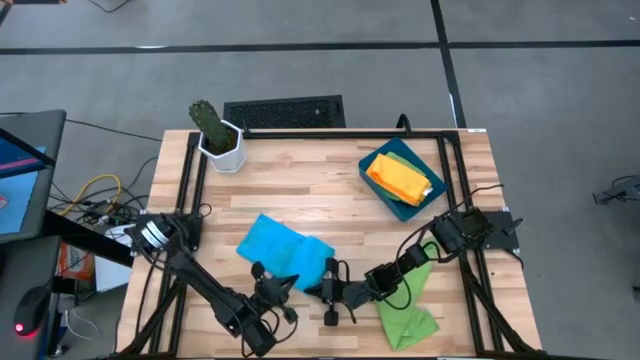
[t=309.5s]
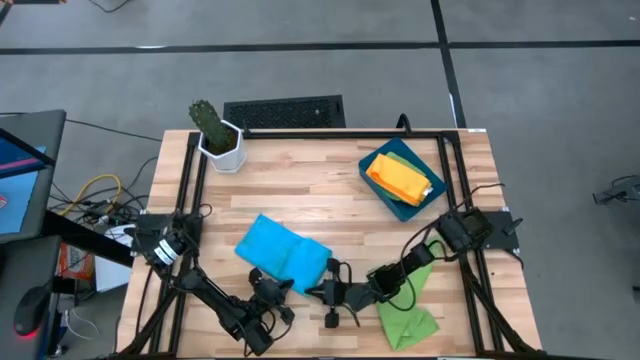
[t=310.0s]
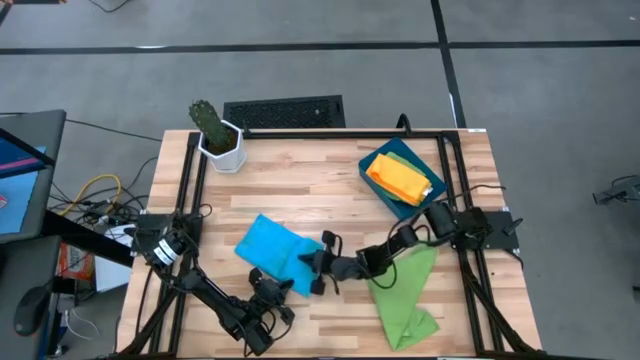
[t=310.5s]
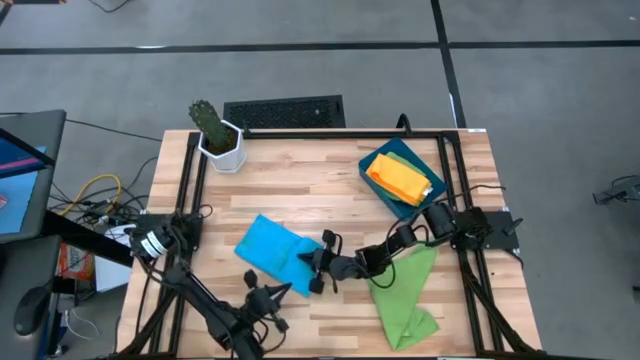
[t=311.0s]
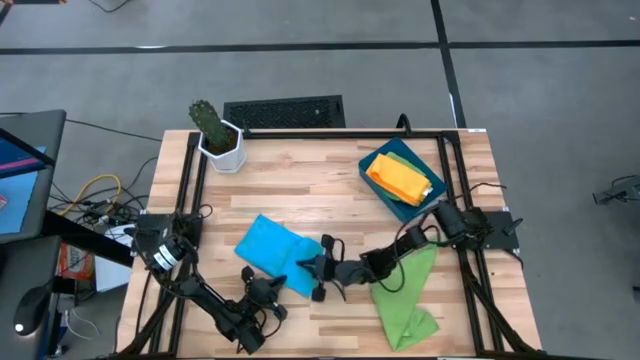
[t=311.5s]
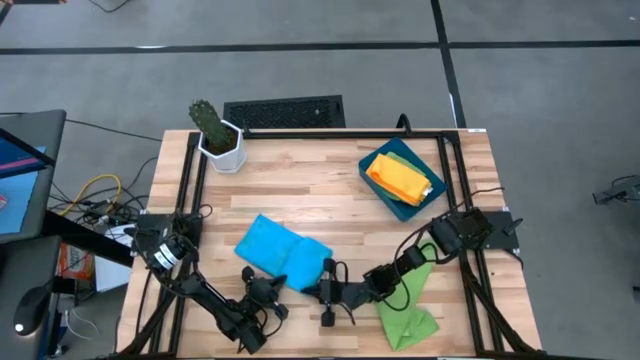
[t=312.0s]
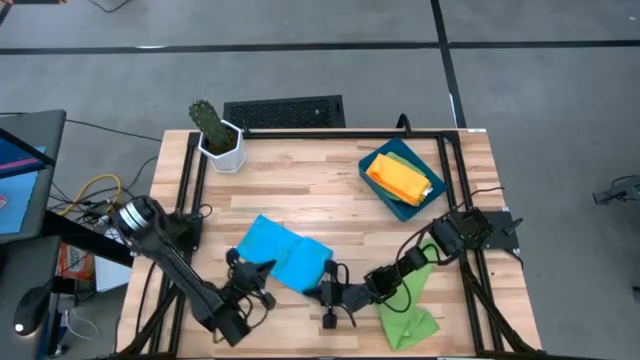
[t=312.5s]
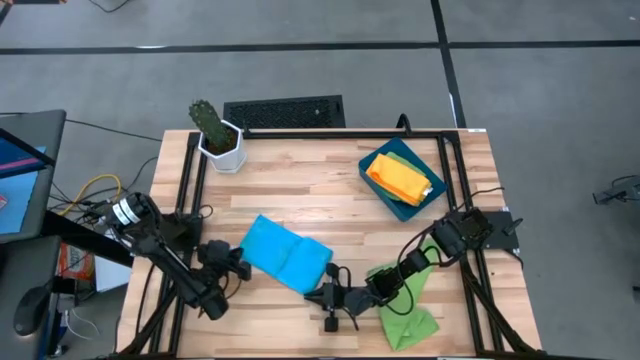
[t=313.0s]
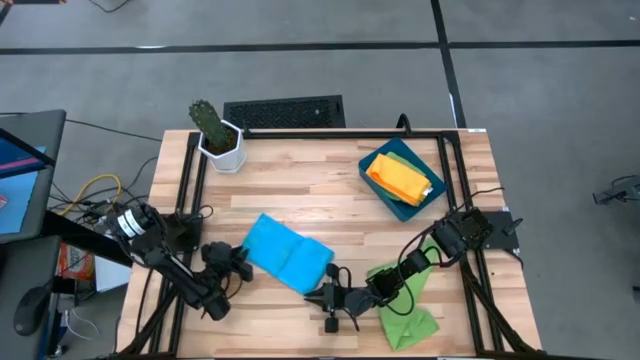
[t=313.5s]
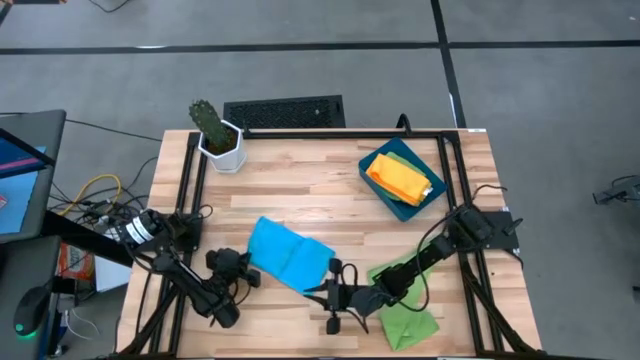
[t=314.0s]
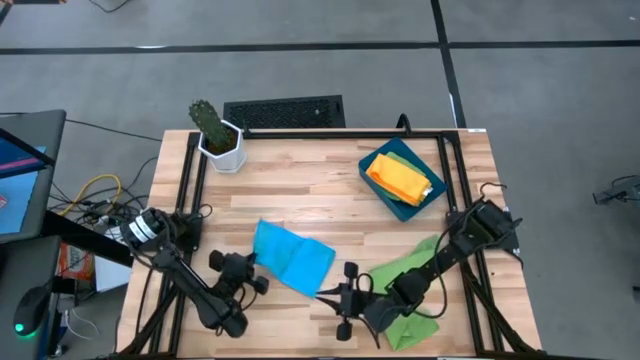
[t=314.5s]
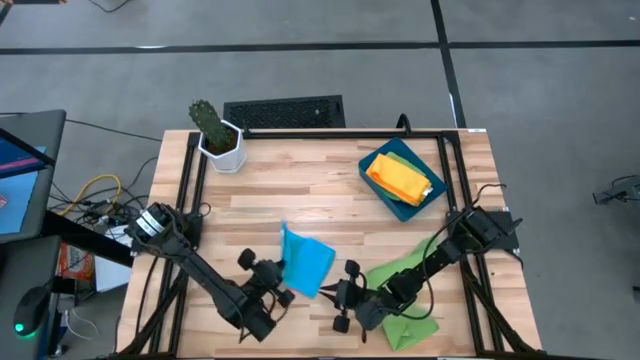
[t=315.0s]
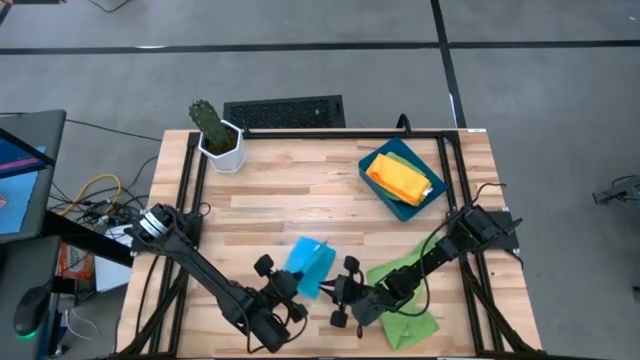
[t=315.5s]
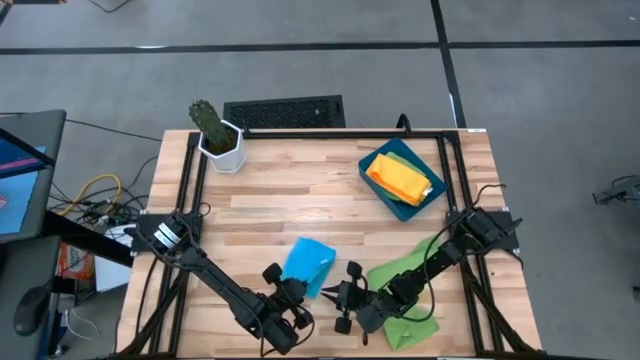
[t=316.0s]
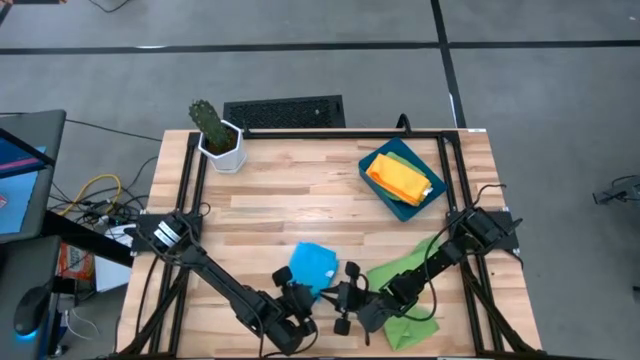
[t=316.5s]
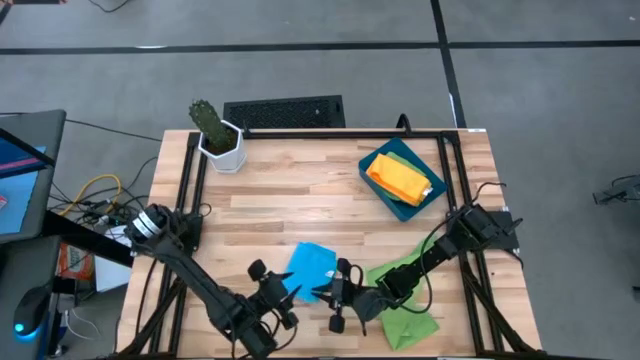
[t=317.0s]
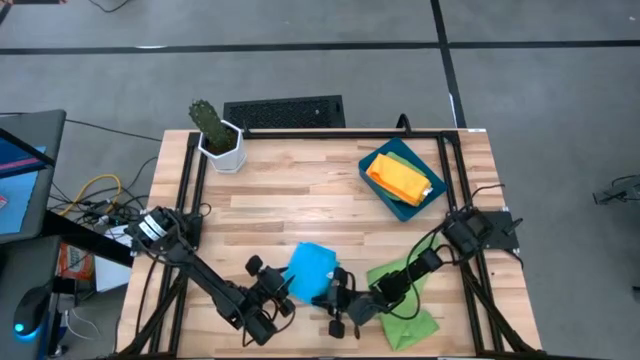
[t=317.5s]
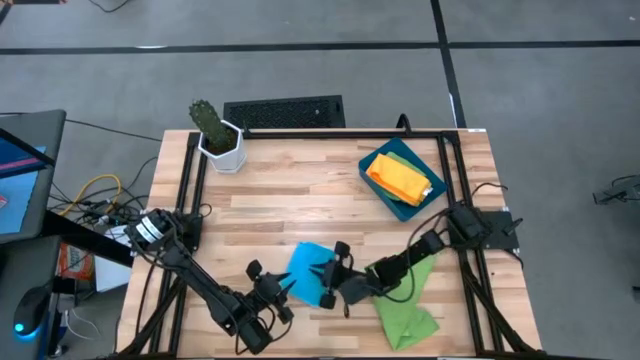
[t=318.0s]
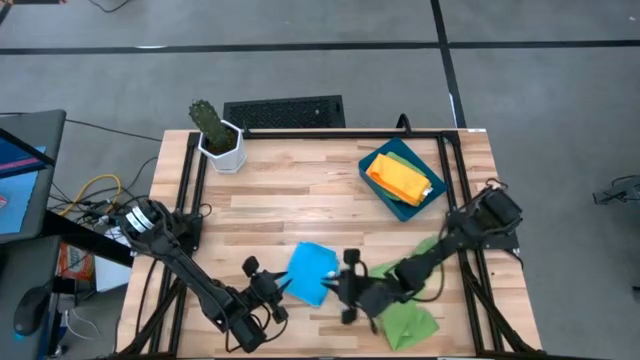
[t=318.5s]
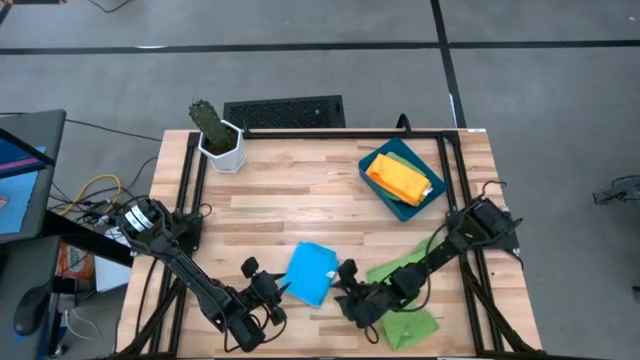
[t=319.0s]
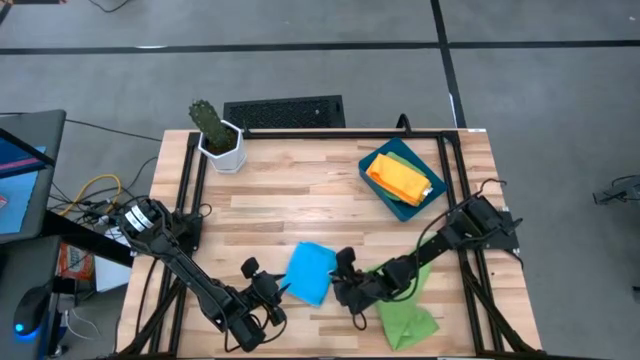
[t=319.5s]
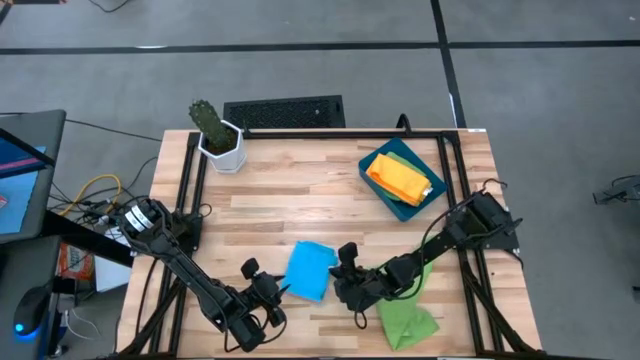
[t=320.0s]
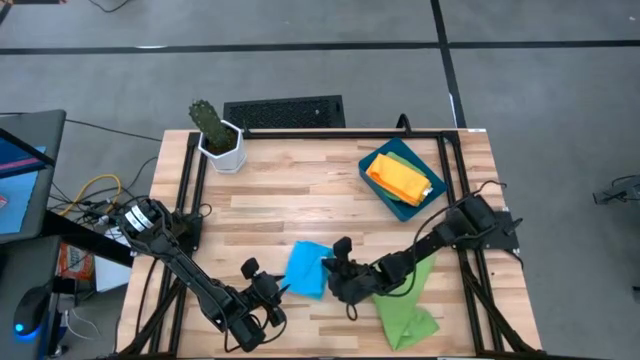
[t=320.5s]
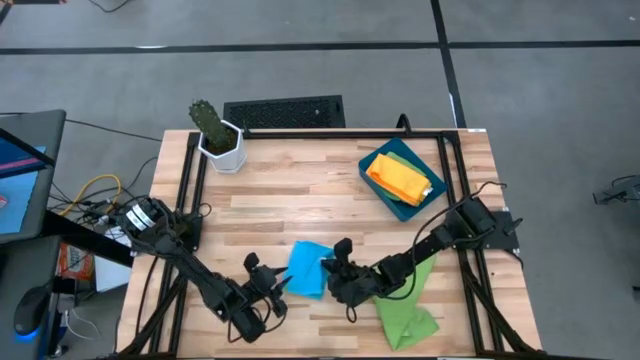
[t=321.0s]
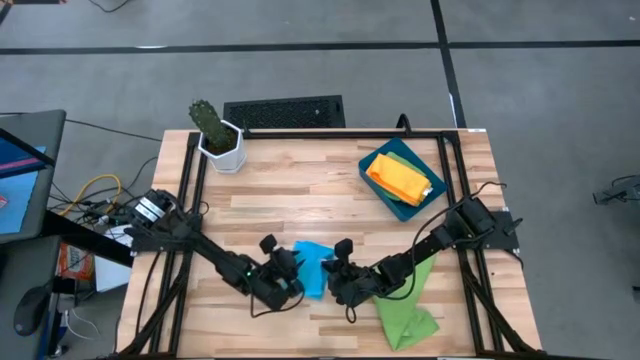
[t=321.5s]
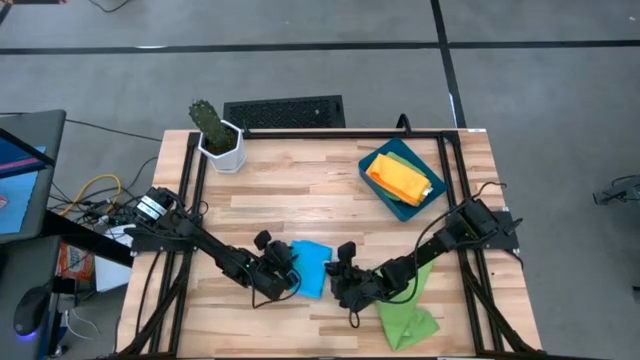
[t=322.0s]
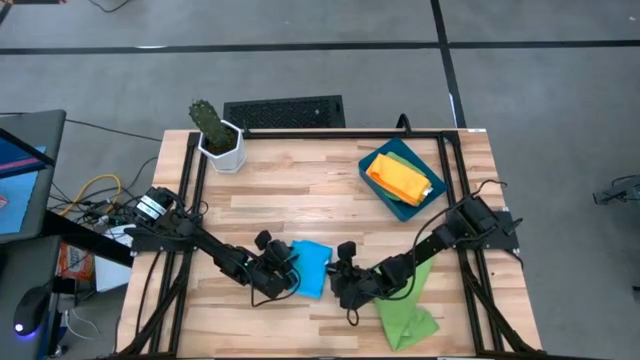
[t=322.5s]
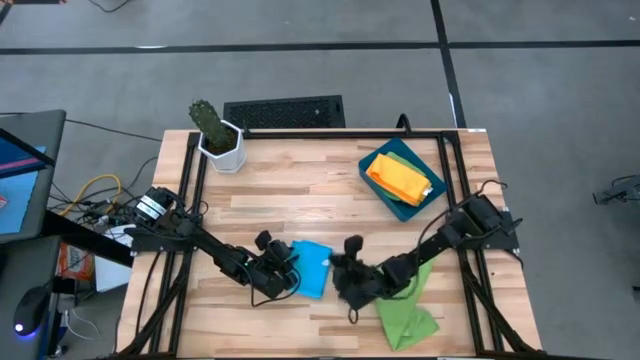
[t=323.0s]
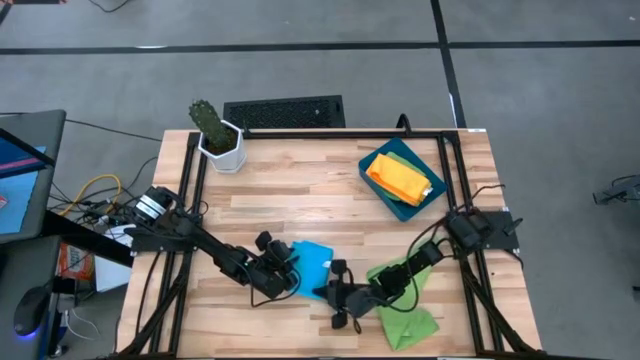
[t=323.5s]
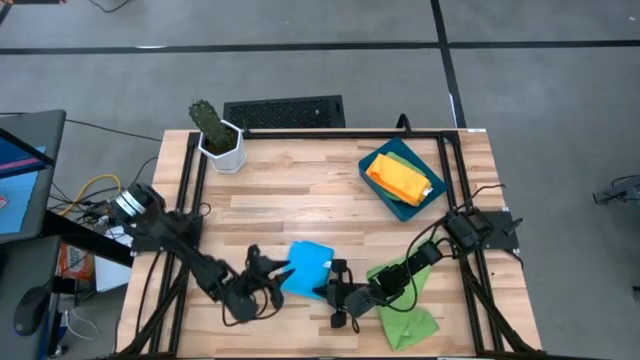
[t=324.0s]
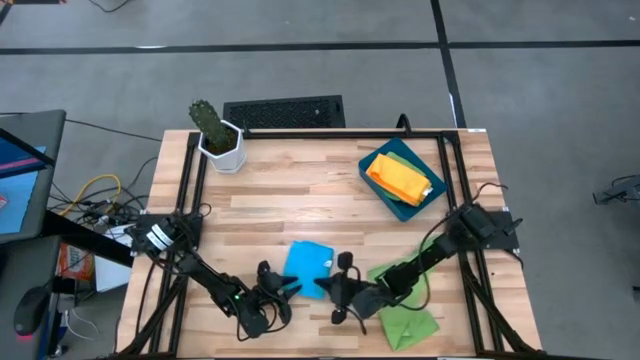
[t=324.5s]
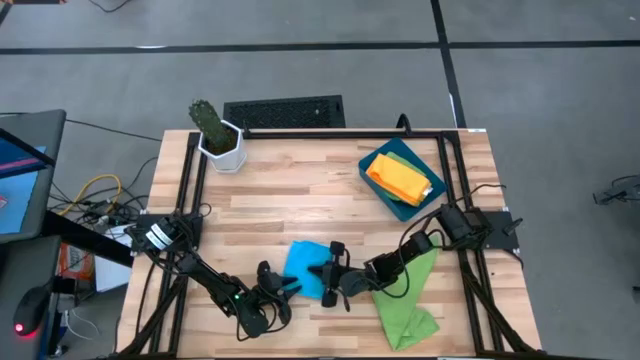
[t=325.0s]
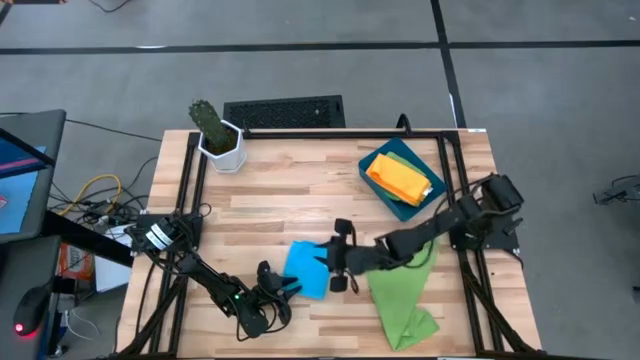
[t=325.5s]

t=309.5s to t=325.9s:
Task: Fold microfiber towels
Fold the blue microfiber cloth

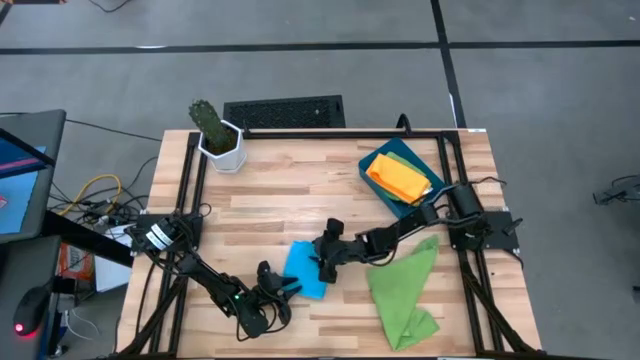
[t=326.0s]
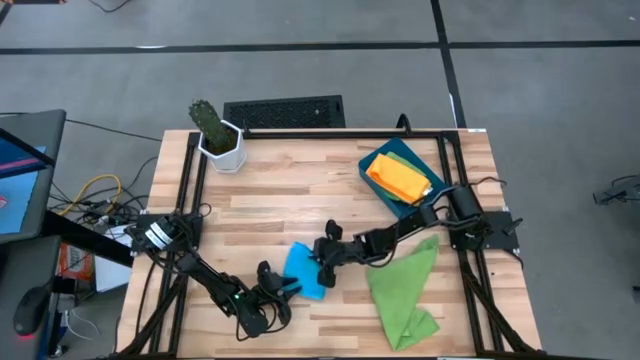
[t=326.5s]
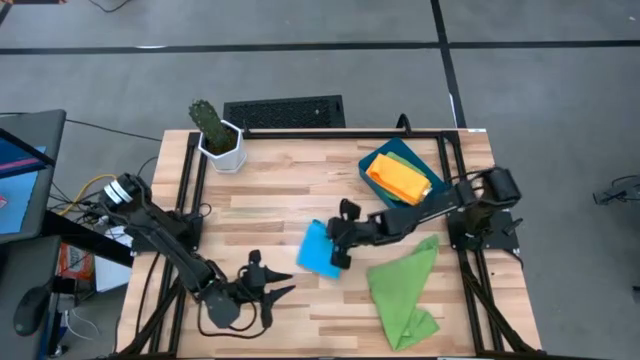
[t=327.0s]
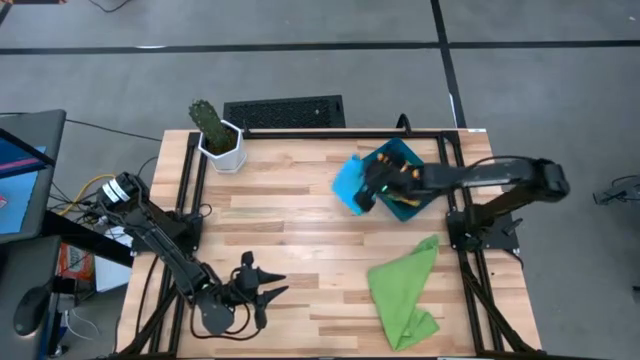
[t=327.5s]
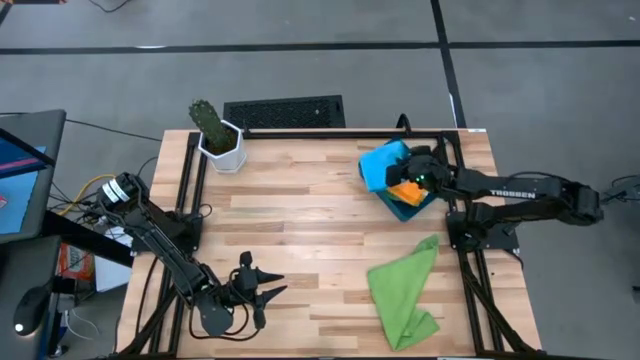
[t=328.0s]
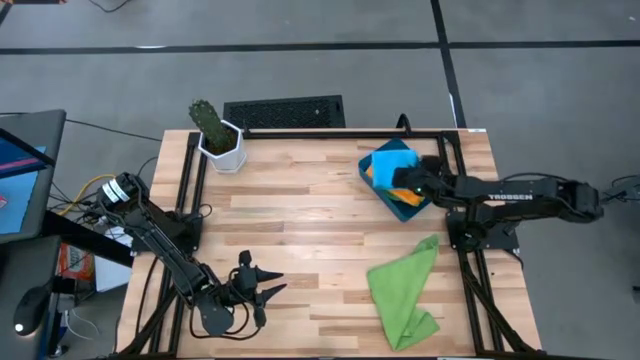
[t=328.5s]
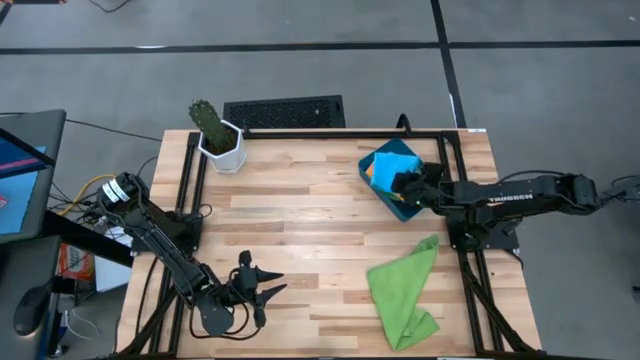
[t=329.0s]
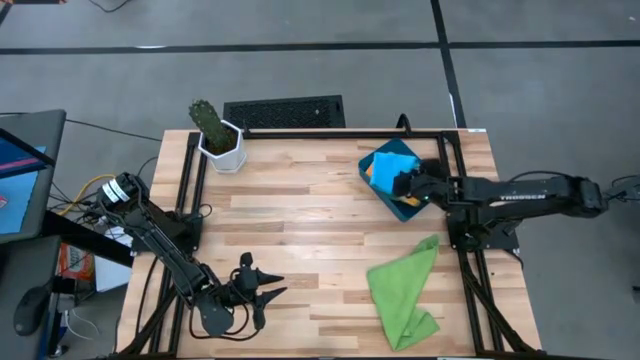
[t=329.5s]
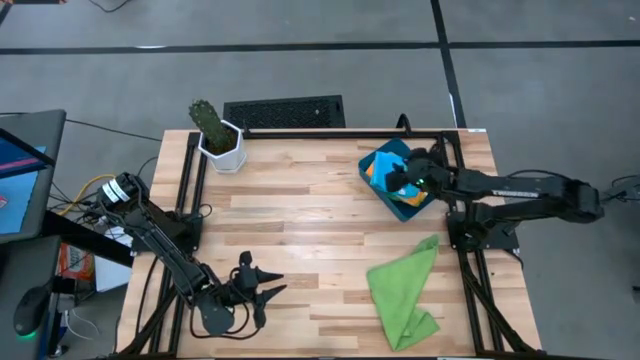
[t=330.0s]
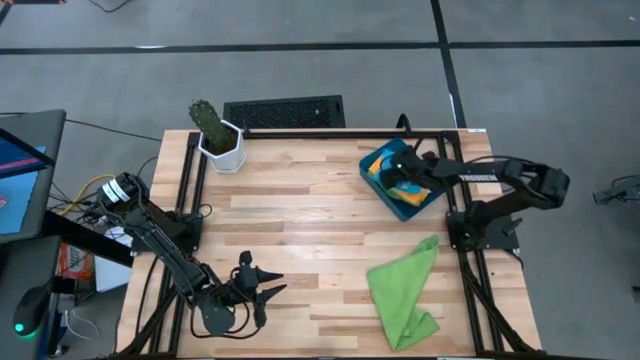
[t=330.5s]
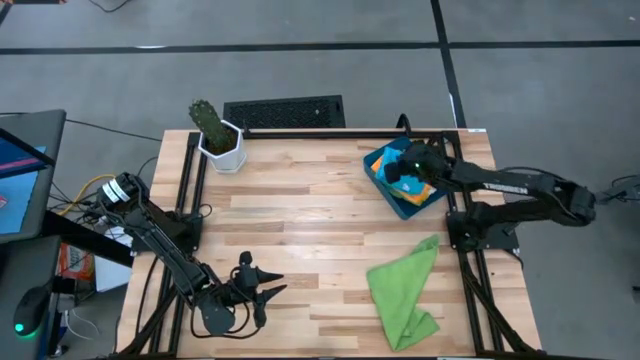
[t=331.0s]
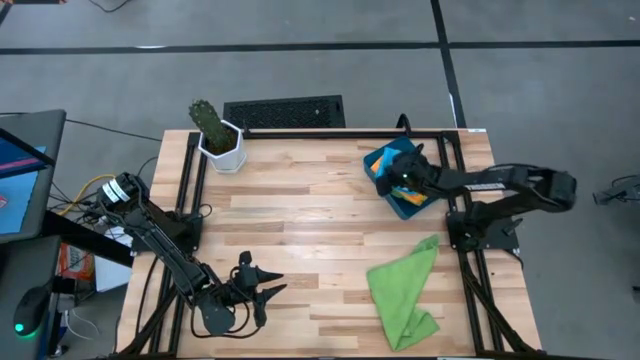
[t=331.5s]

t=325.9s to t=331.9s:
Put the blue microfiber cloth into the blue bin
